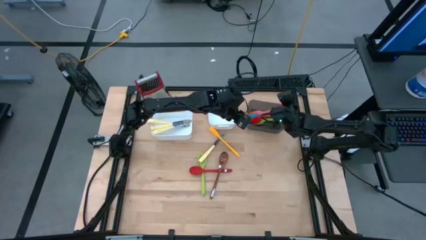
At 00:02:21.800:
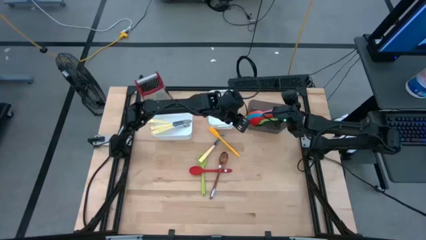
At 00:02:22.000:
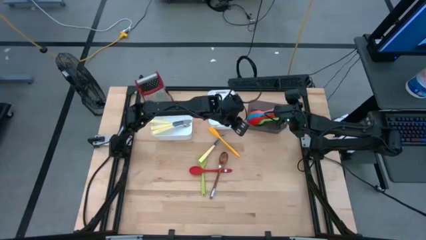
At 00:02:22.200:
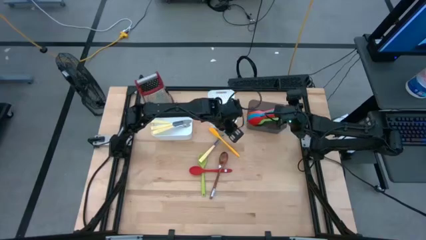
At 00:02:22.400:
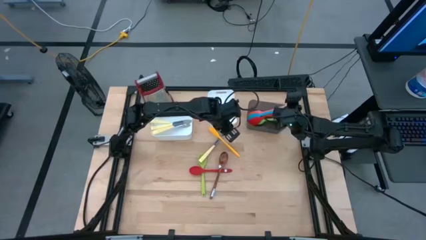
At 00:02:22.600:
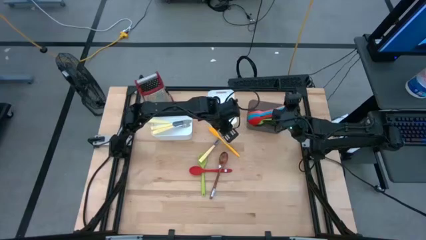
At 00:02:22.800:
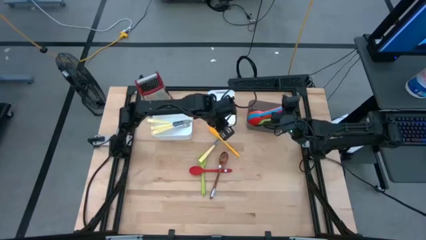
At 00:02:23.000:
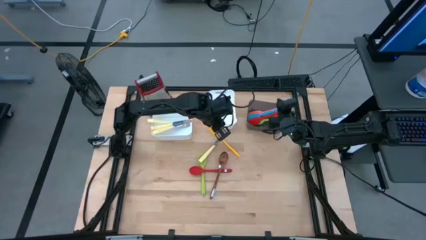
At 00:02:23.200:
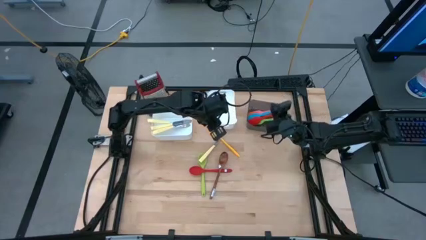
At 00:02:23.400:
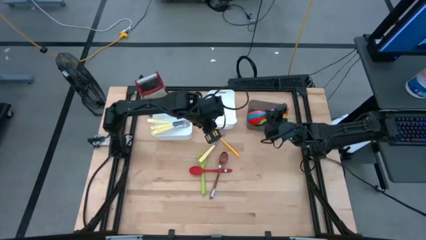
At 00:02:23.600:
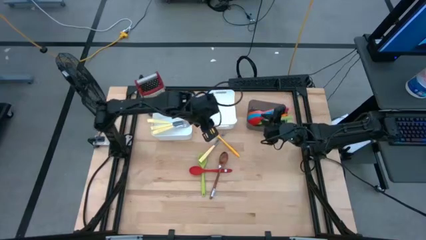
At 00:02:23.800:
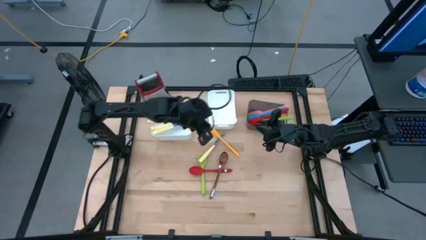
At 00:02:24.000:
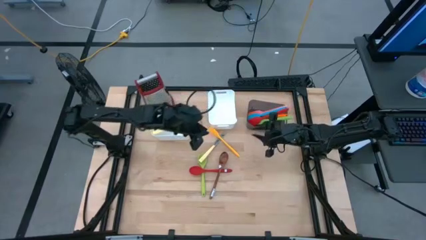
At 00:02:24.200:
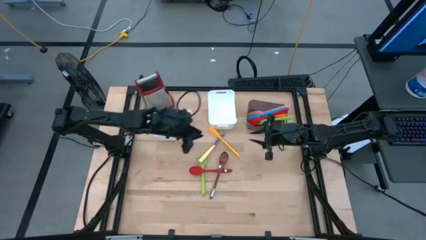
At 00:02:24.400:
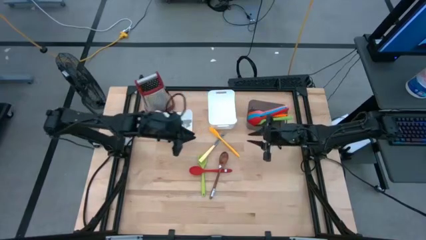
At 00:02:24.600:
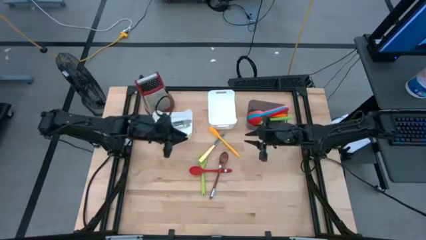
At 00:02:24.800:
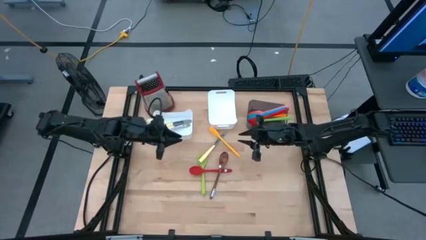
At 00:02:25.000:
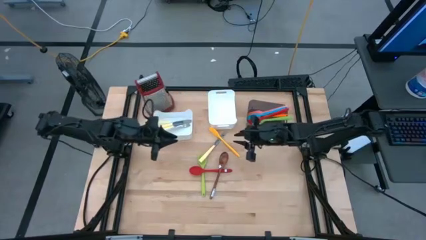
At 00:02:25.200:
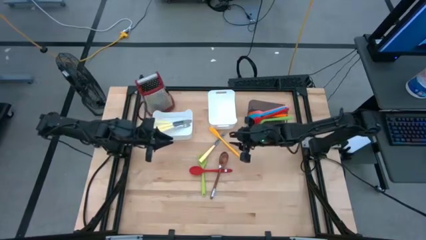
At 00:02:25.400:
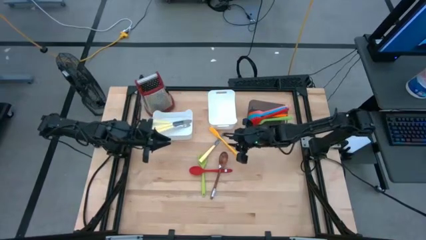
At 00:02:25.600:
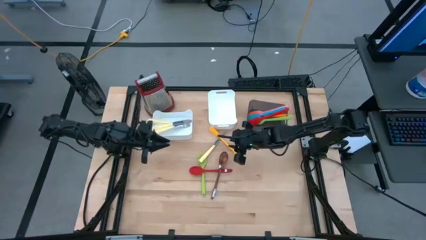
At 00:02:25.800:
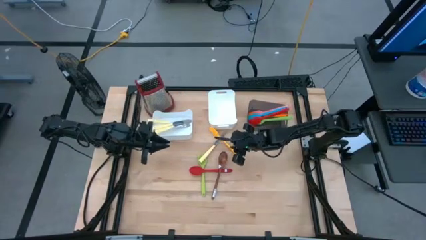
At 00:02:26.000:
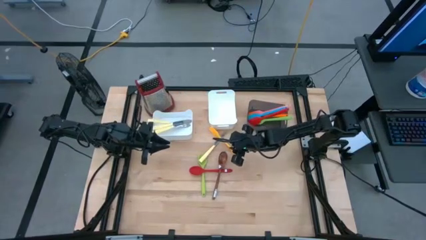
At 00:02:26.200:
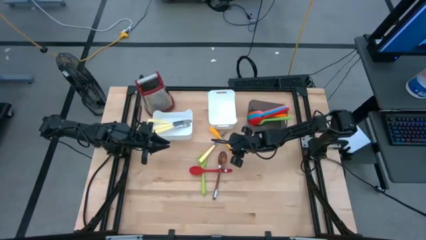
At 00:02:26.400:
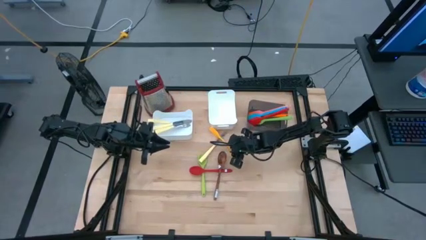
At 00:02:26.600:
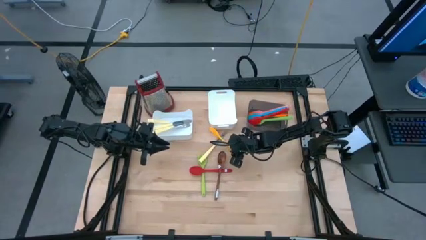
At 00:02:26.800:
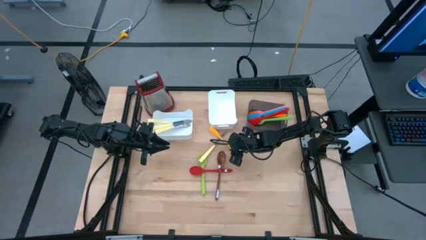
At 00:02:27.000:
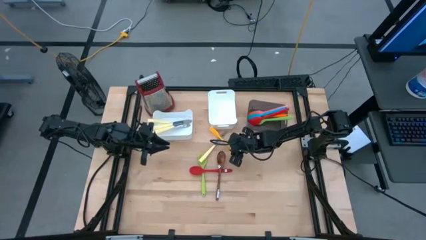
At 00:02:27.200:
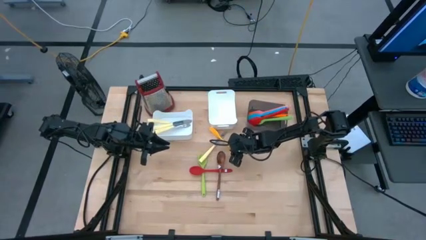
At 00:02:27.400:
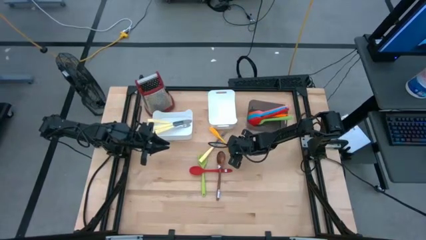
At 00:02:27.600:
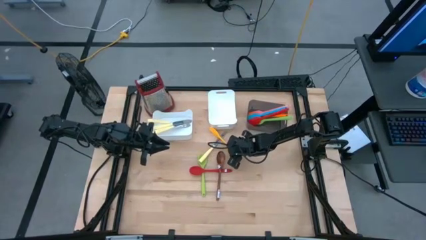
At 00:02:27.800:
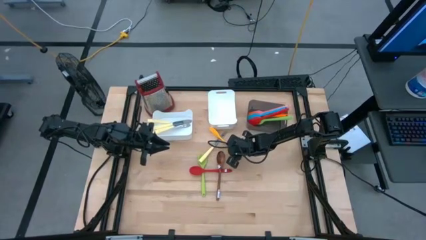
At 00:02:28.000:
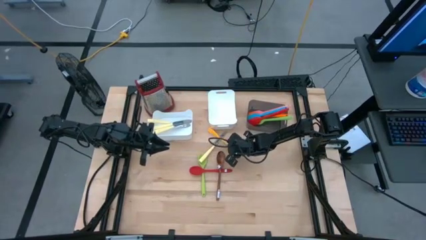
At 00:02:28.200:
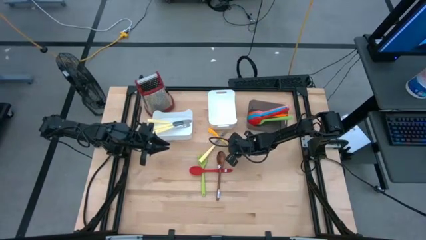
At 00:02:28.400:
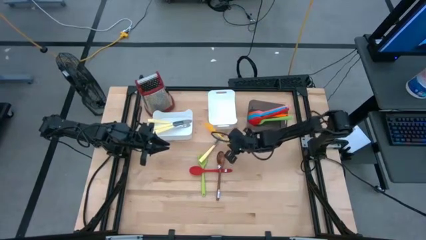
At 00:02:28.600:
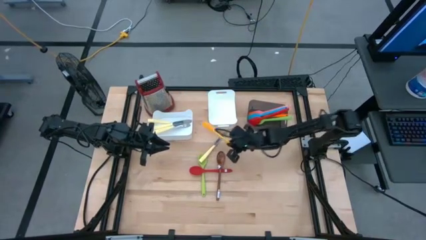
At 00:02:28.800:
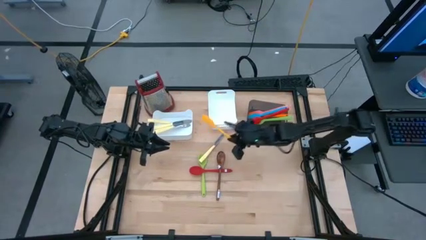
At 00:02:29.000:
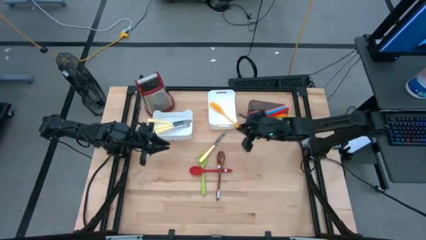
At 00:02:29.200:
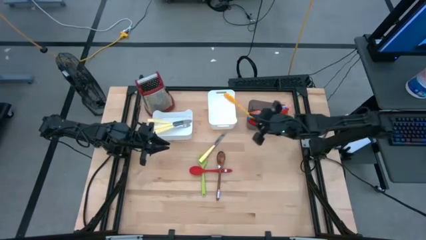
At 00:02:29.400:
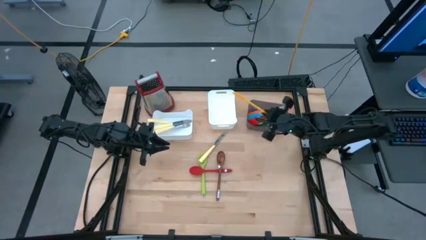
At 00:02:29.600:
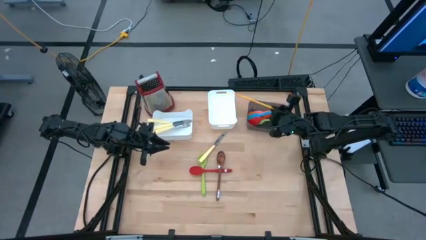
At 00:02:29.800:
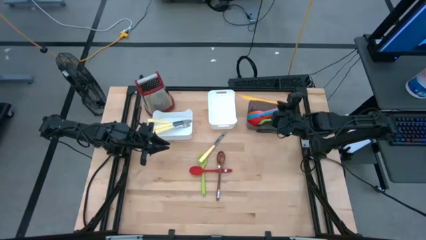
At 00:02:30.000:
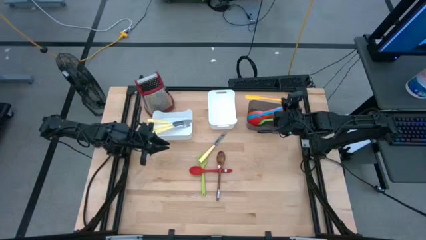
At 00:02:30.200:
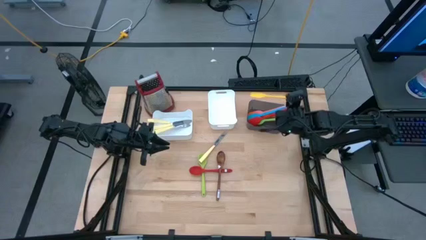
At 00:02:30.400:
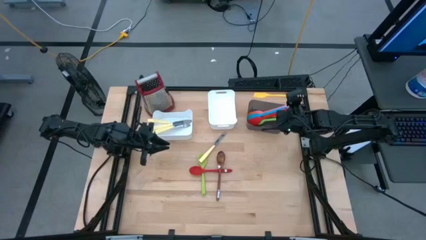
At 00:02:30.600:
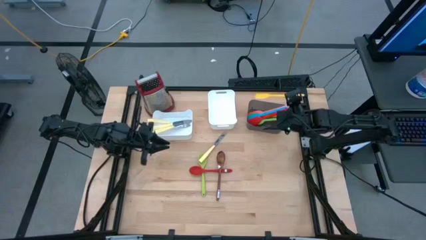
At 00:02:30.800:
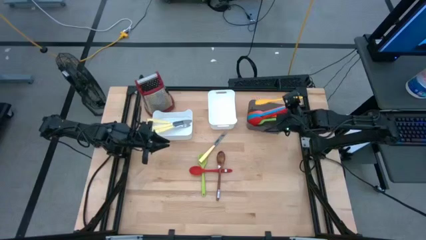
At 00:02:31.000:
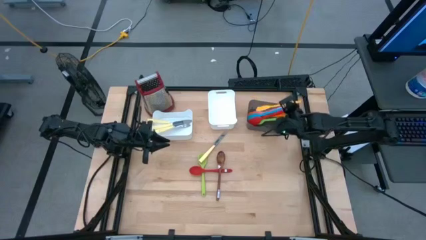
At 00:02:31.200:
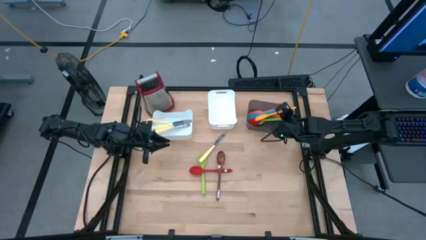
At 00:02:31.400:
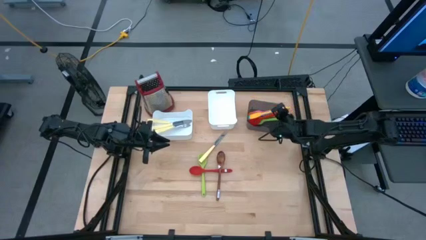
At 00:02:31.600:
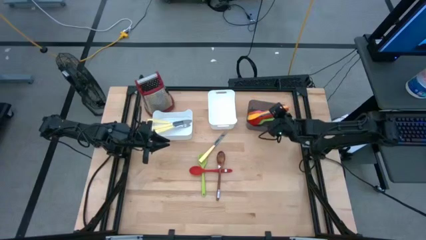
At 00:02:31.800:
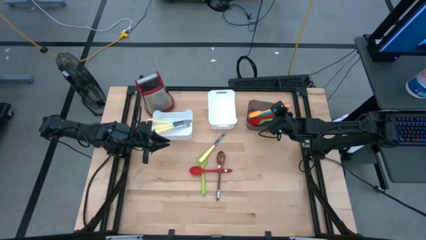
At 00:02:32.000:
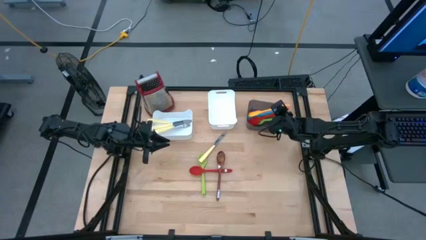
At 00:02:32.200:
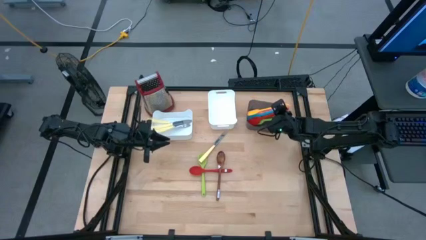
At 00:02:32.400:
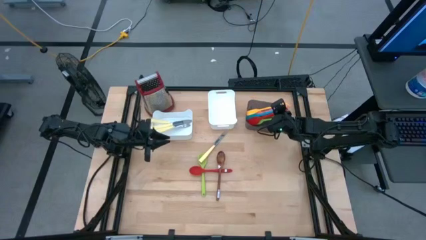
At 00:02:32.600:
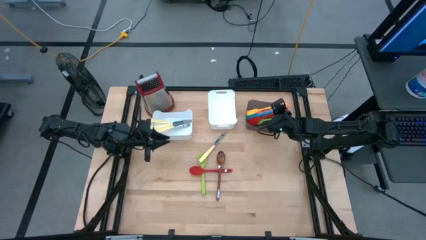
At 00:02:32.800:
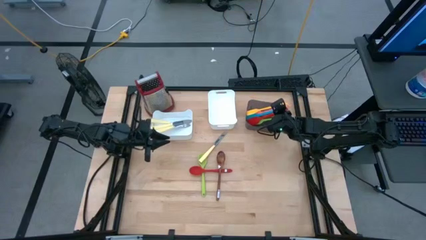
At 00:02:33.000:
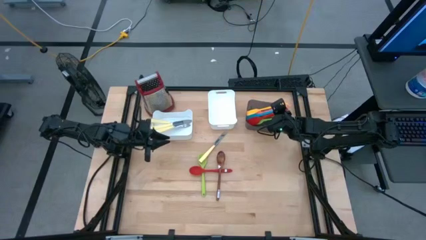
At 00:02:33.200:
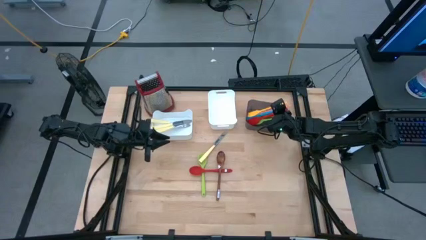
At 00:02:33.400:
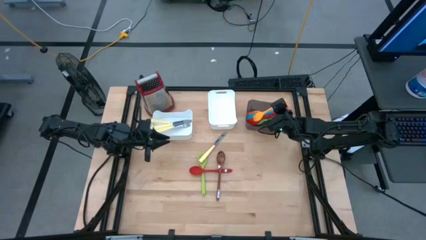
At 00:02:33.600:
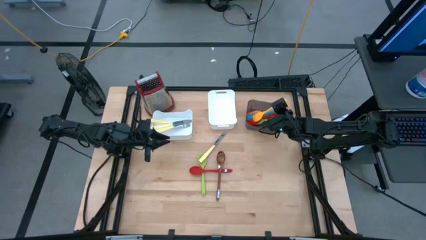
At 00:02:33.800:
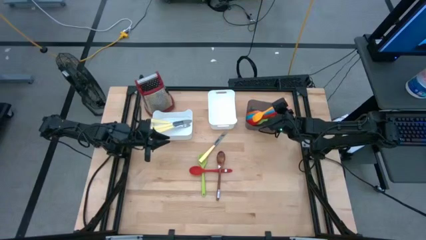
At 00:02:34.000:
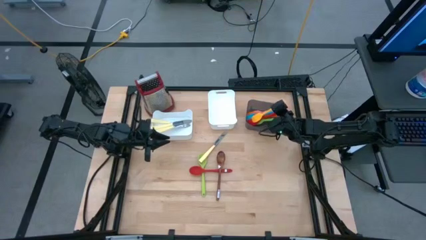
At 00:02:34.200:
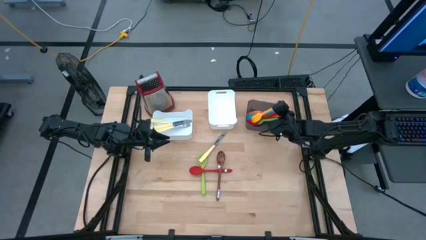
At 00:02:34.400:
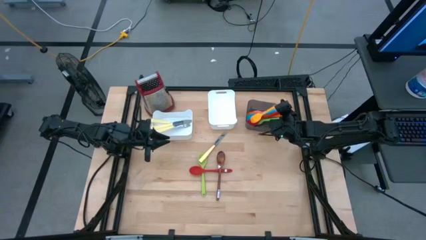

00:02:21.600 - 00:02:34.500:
Task: Pick & Place Kitchen Items
Put the yellow spatula into the black bin
